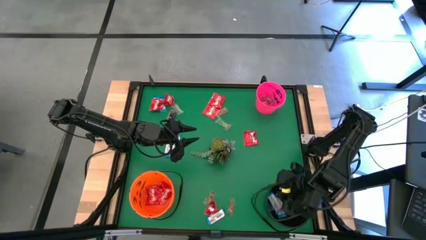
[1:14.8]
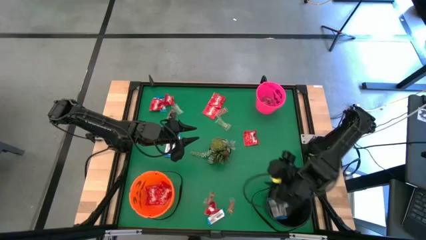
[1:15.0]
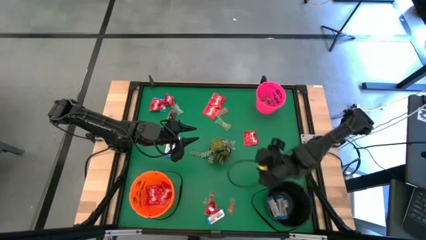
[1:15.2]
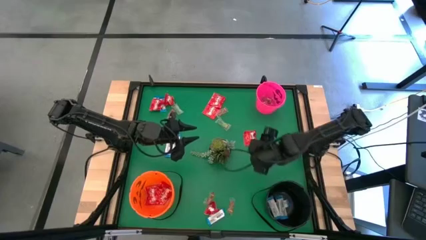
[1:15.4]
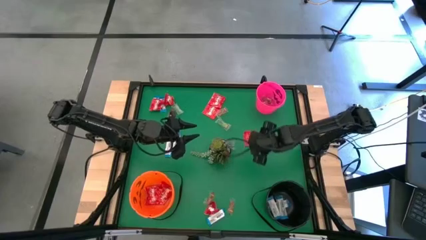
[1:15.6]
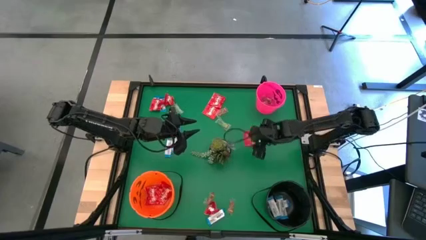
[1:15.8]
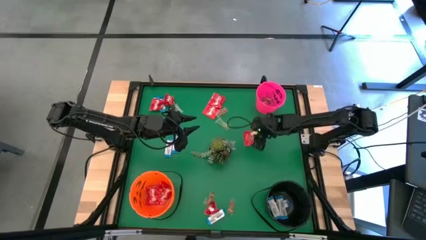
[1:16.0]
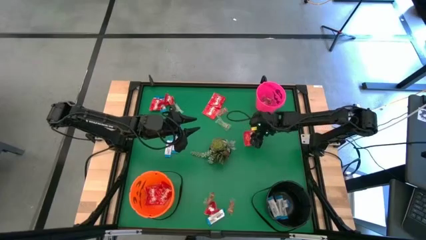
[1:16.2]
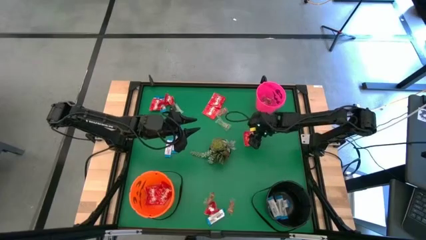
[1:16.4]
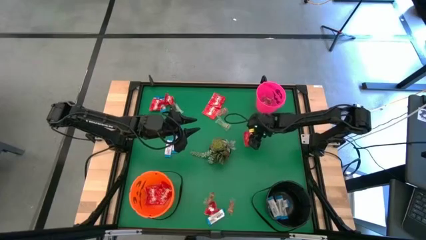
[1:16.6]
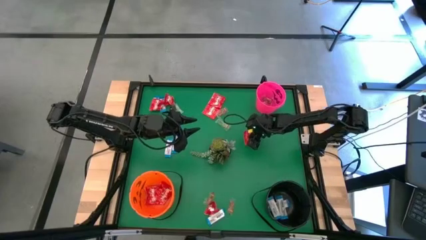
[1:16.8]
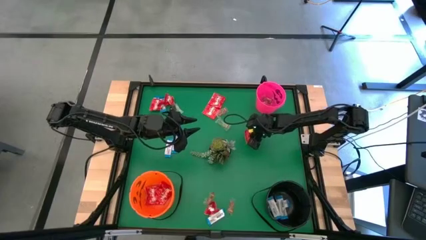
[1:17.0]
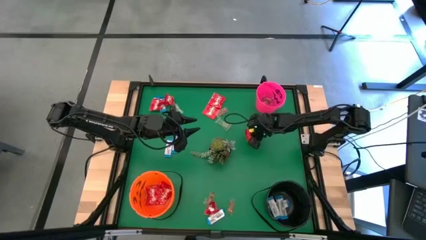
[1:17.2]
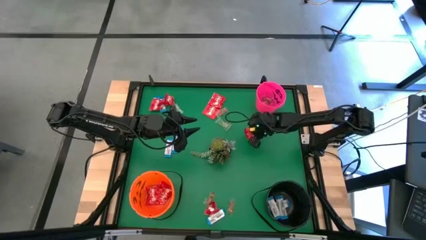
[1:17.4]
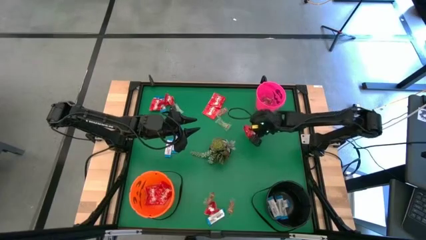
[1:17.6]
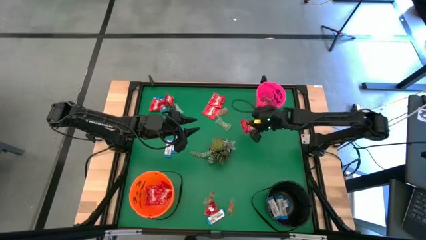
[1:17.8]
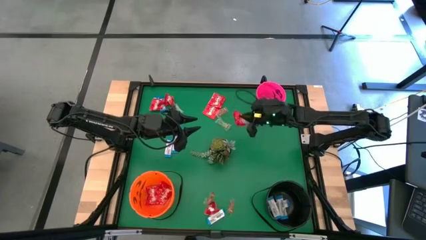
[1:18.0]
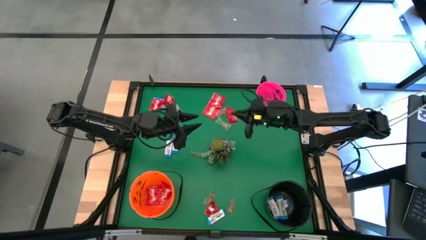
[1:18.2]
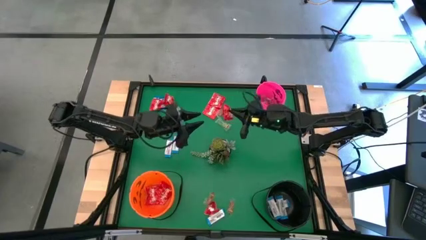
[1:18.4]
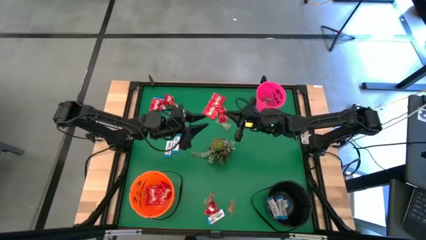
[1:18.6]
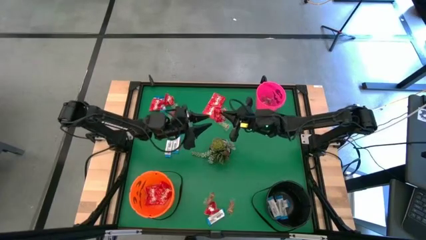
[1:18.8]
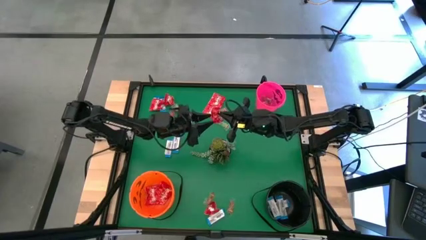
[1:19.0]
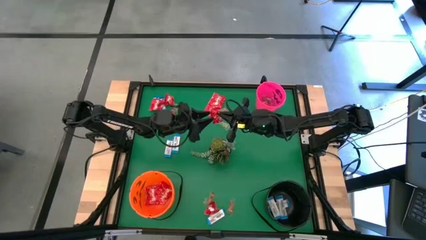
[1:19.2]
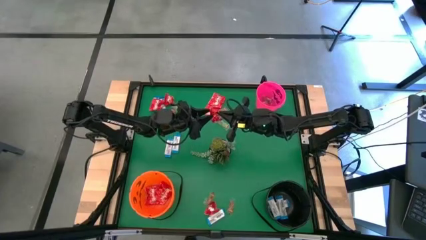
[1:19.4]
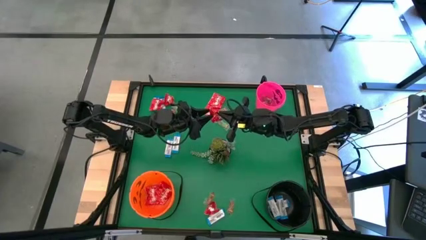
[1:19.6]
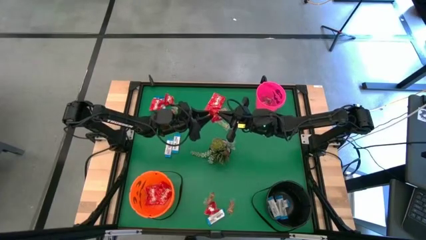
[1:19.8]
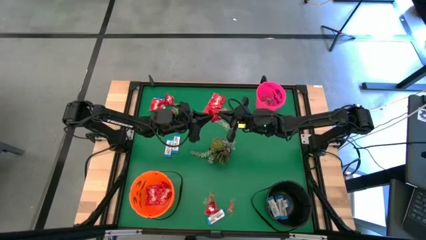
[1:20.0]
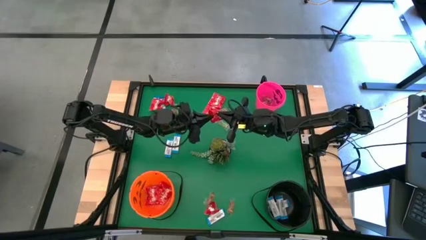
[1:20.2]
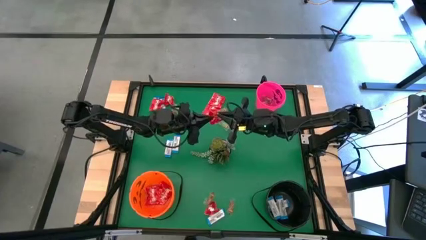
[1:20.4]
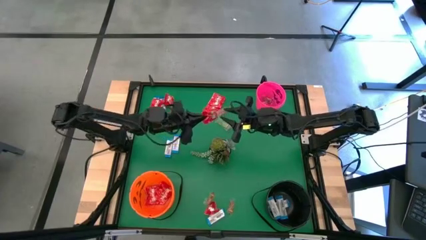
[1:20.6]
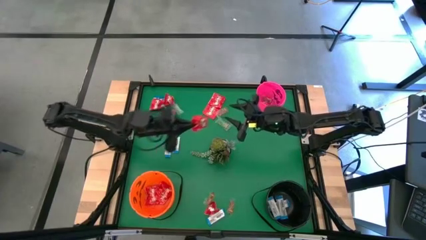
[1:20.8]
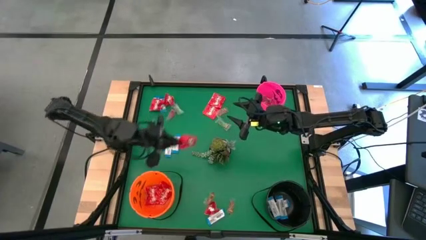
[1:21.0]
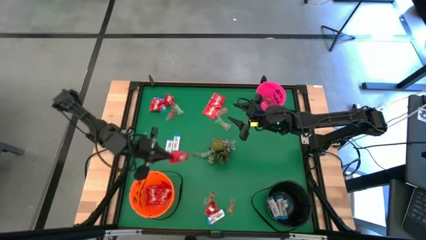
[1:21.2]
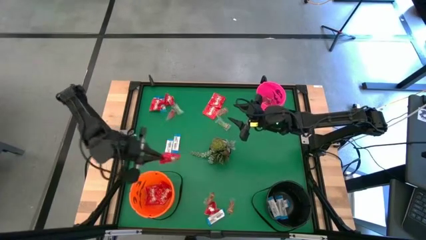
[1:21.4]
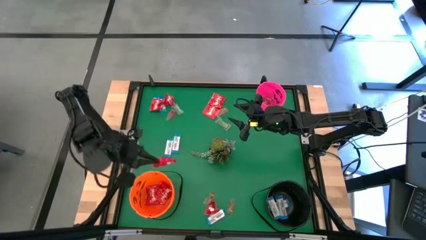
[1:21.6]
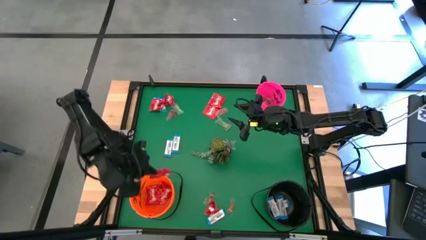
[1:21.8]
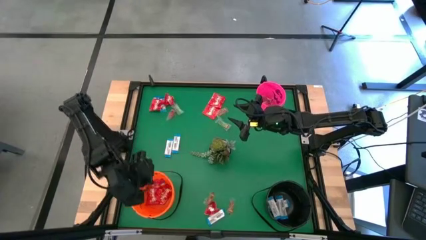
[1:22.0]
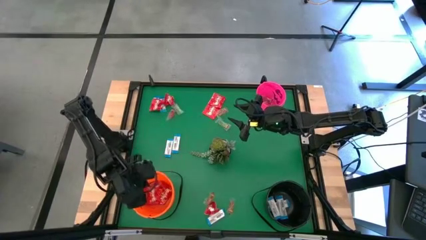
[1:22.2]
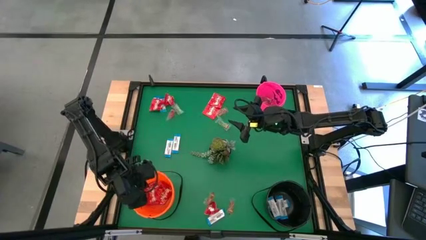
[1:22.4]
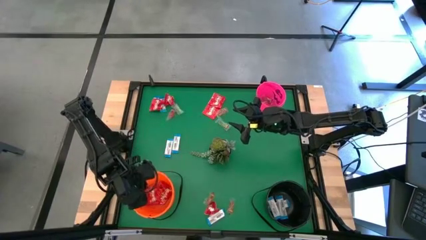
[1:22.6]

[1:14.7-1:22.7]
Task: Sort candy
Put the red candy into the orange bucket

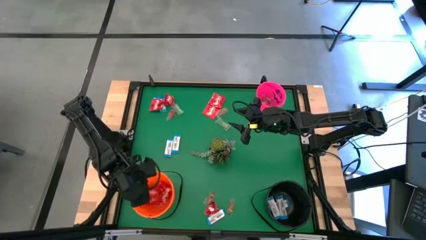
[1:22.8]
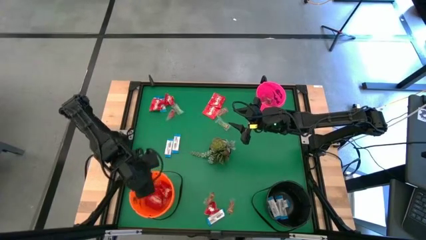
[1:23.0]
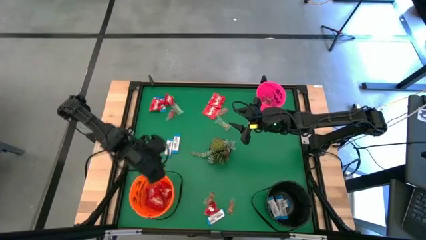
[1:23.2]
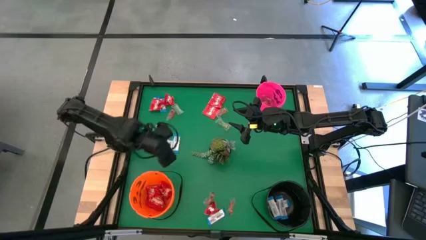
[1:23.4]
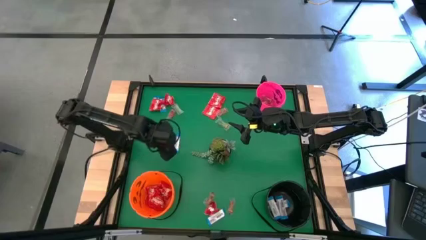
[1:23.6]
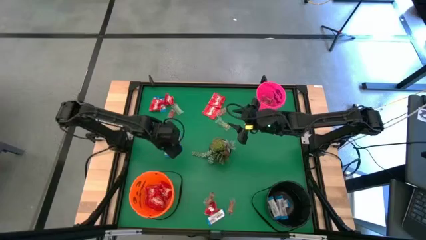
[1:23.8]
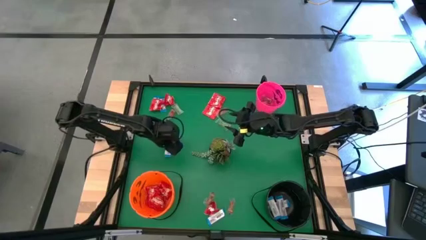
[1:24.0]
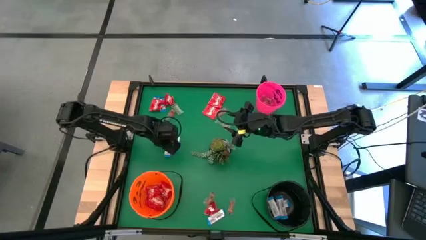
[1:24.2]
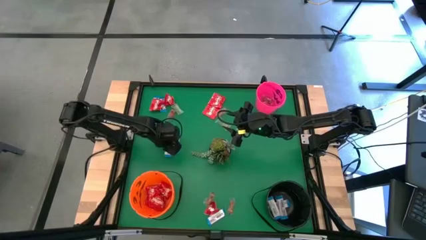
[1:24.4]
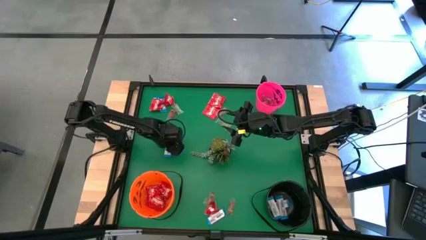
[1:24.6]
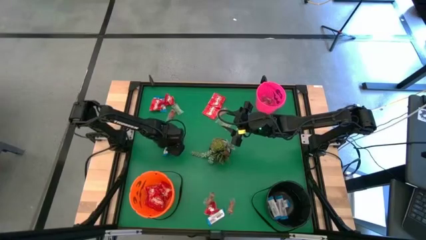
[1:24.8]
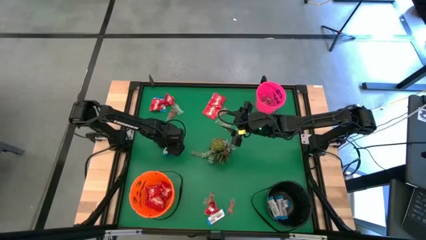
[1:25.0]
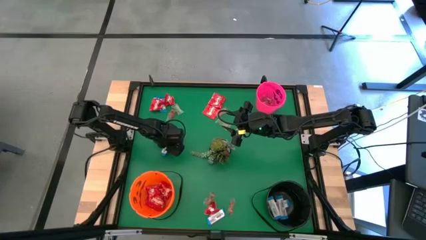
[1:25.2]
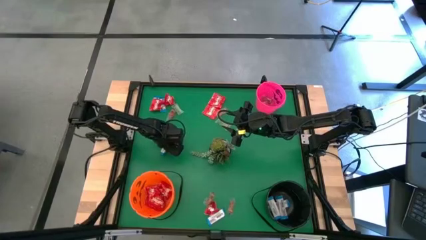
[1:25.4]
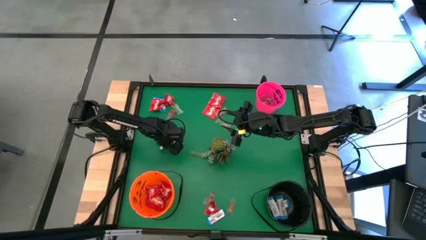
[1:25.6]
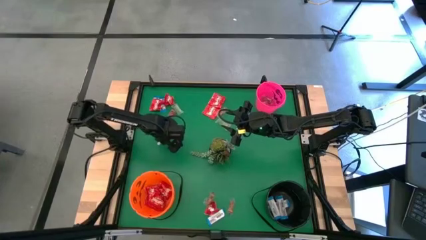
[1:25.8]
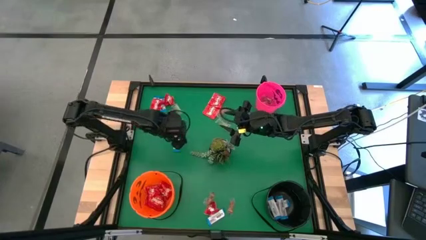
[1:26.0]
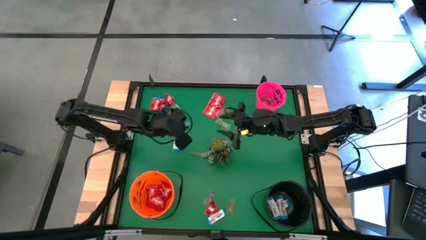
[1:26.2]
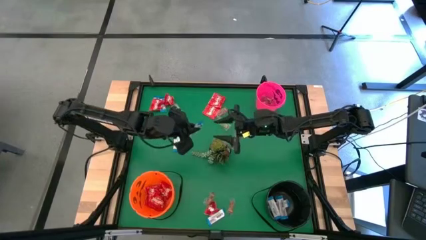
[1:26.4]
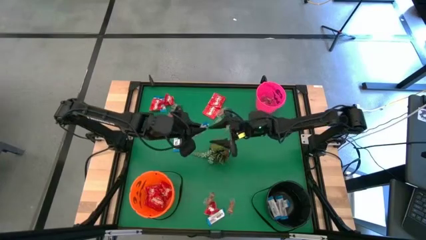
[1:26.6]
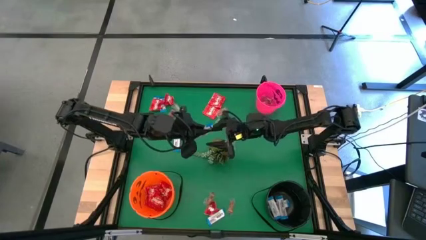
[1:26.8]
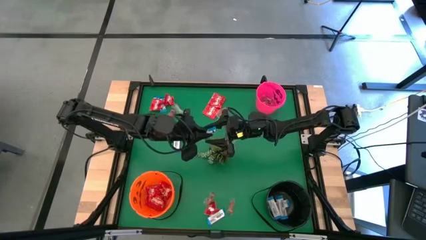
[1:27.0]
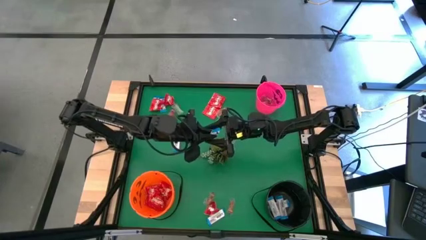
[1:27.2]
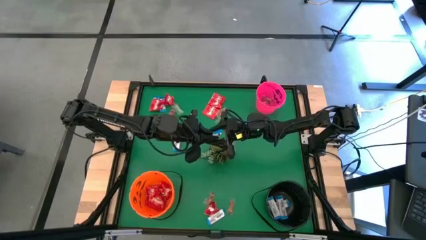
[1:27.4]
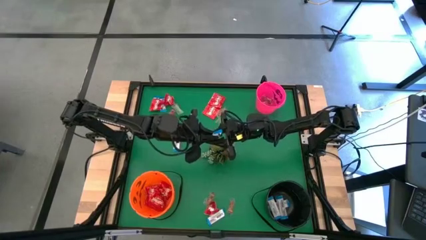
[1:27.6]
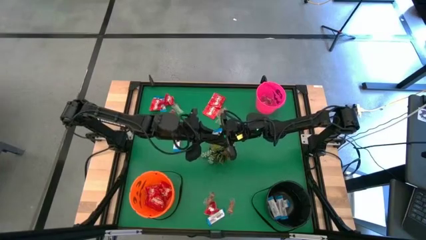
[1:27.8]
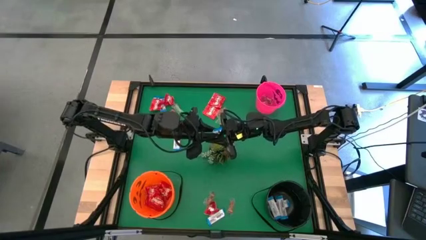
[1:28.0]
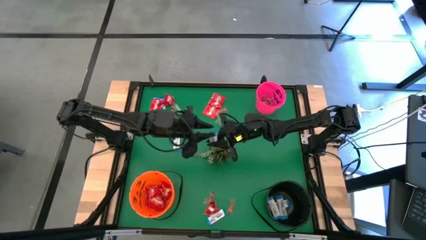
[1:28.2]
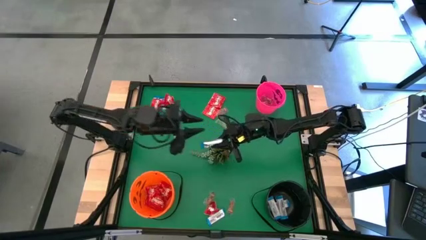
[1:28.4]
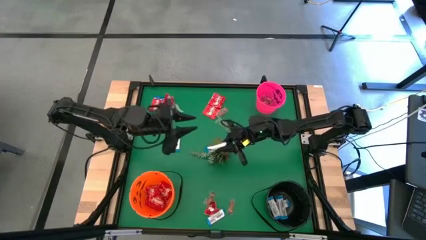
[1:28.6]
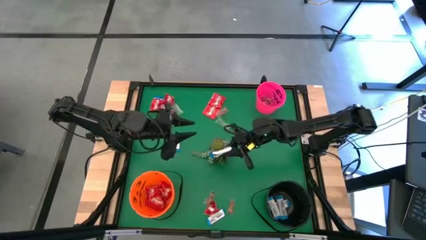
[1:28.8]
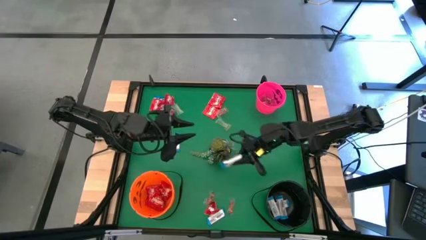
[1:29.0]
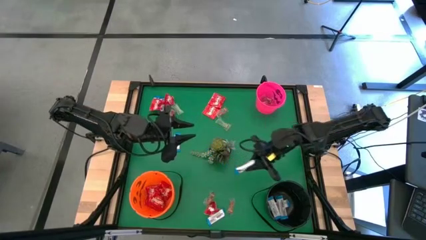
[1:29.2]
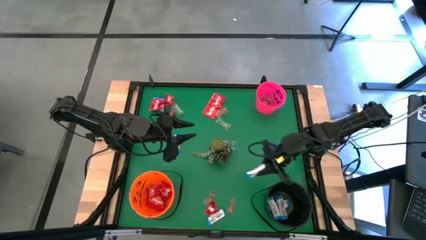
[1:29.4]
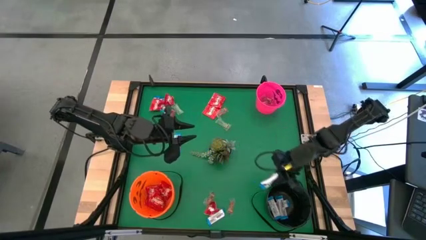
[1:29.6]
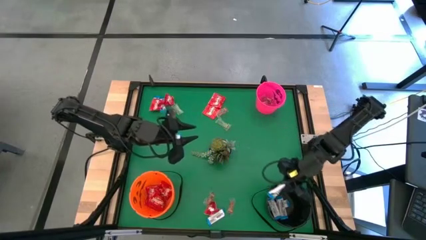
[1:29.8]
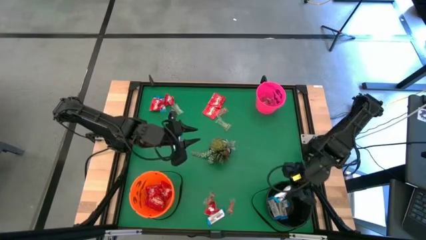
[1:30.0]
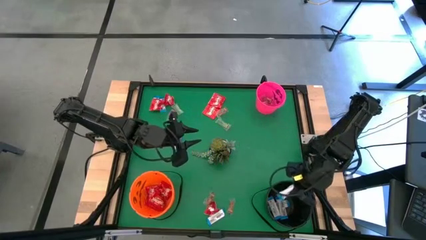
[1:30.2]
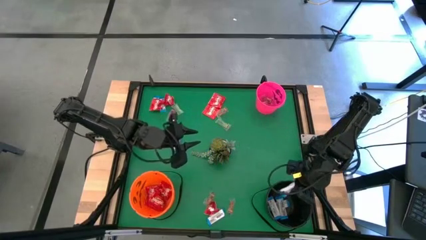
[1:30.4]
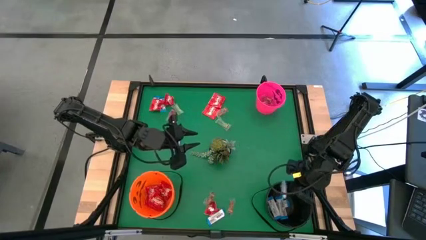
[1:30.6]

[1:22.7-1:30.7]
Put the white chocolate into the black bucket

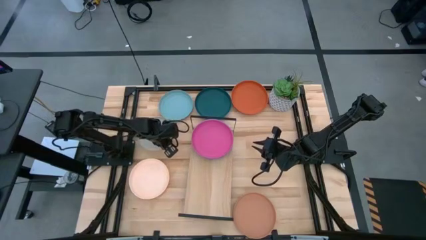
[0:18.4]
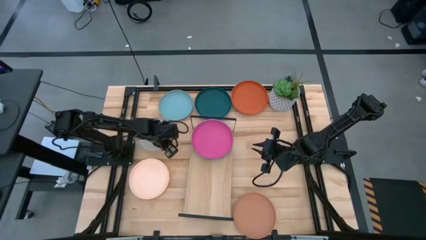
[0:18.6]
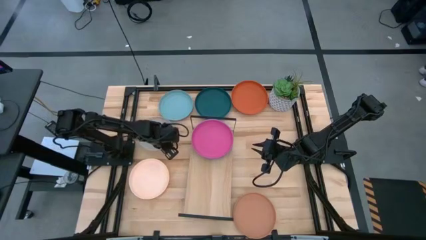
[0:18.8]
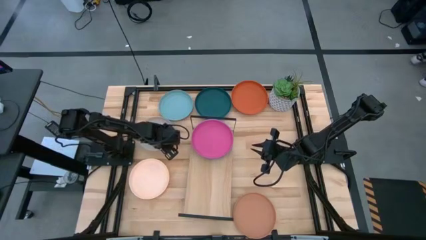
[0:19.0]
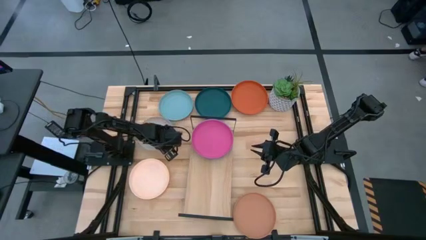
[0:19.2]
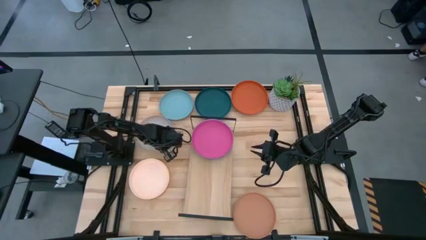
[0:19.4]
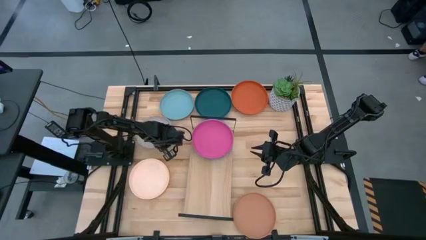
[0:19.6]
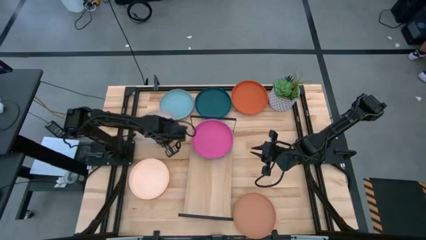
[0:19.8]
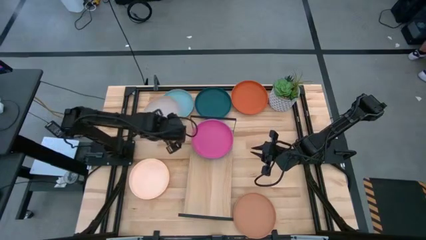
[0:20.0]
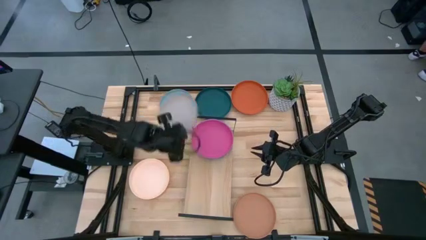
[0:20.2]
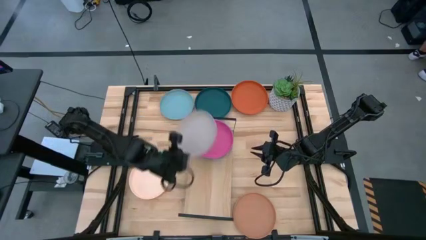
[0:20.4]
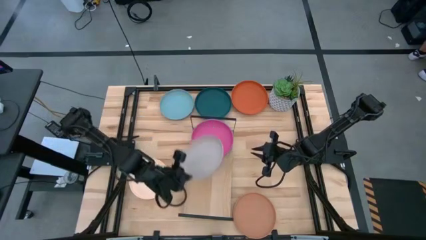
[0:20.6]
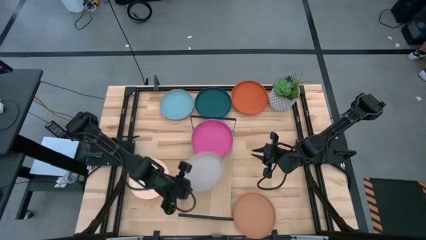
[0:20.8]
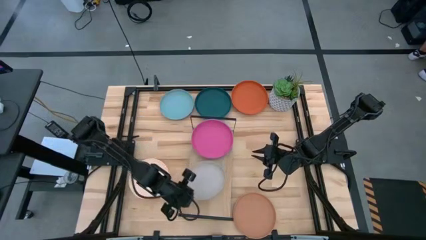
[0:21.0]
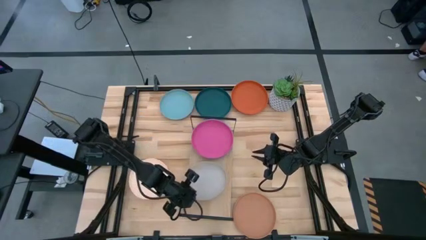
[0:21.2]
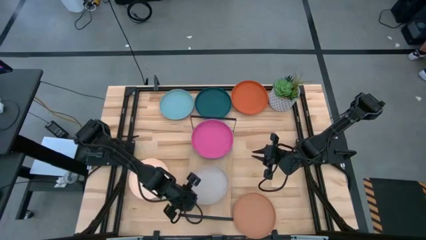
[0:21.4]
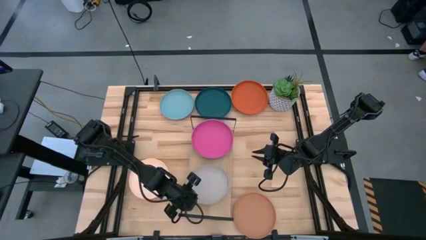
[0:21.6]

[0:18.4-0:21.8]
Task: Place and stack plates onto a shelf
Put the gray plate on the shelf
